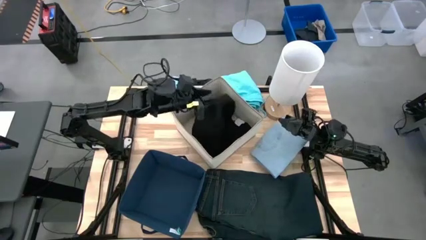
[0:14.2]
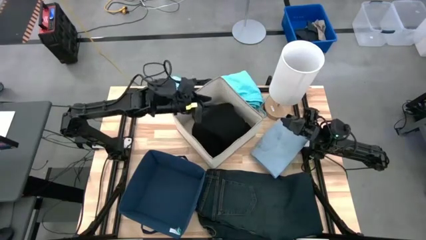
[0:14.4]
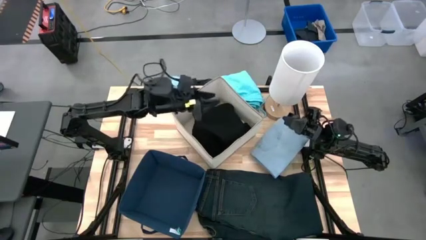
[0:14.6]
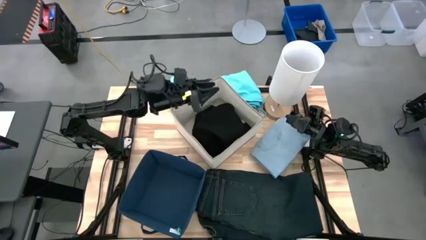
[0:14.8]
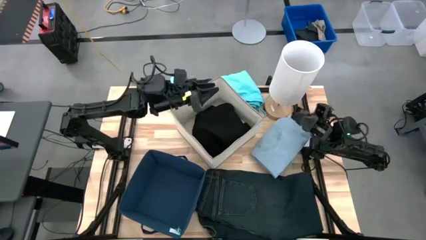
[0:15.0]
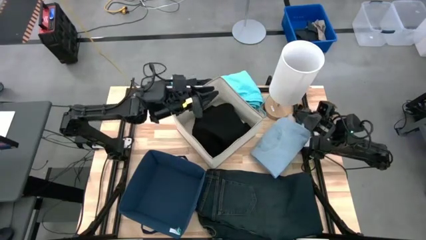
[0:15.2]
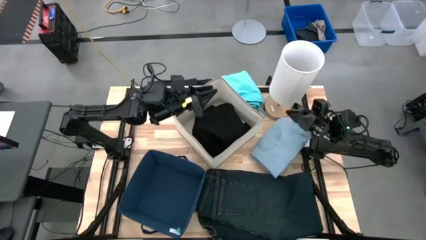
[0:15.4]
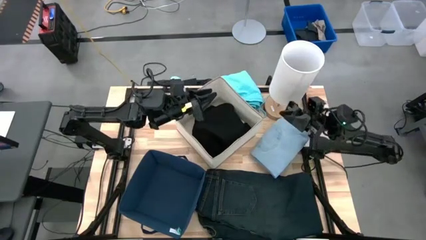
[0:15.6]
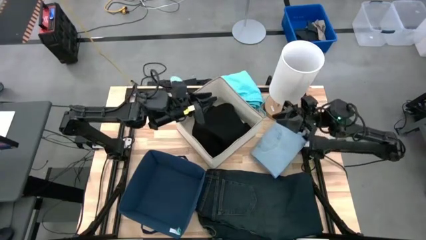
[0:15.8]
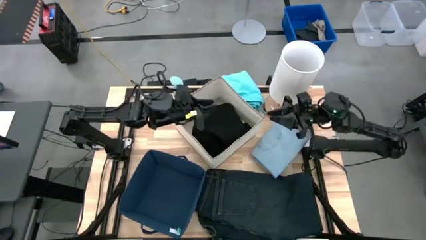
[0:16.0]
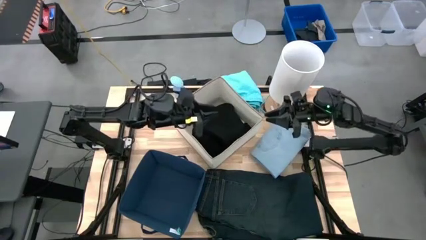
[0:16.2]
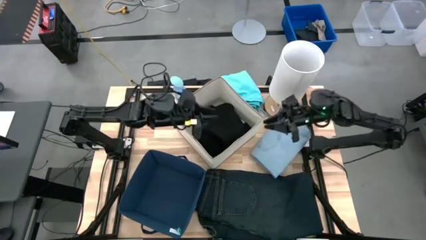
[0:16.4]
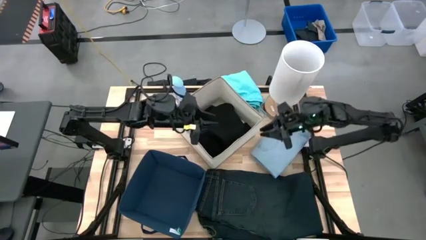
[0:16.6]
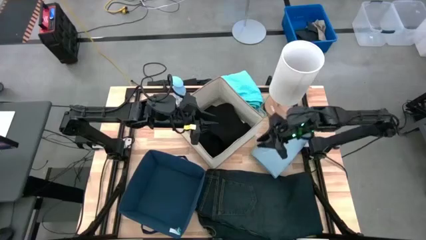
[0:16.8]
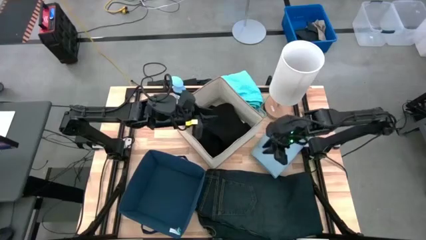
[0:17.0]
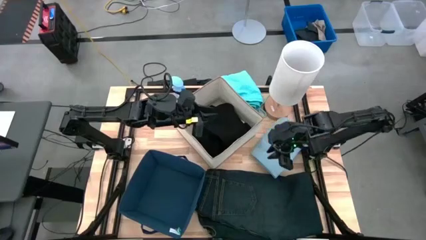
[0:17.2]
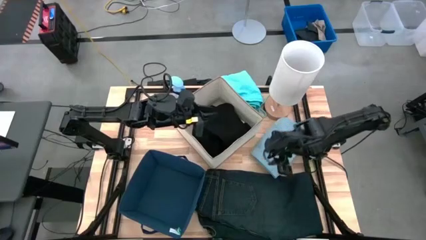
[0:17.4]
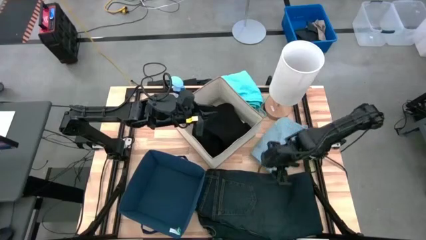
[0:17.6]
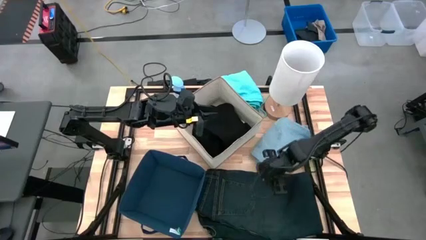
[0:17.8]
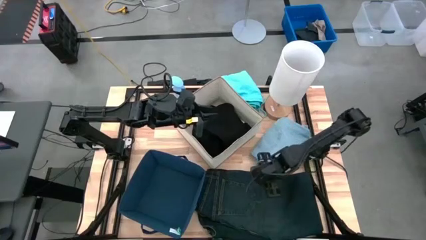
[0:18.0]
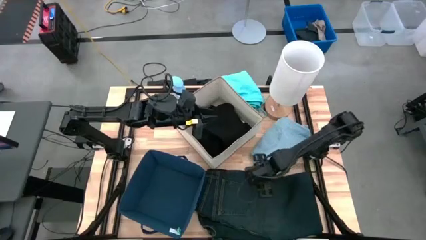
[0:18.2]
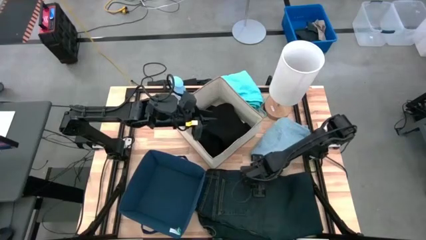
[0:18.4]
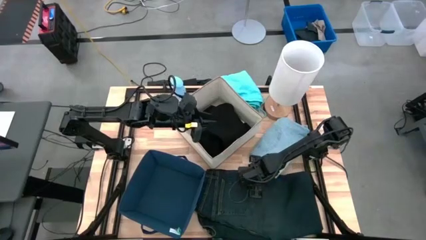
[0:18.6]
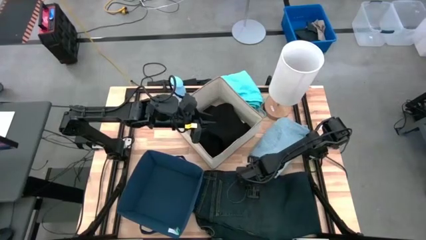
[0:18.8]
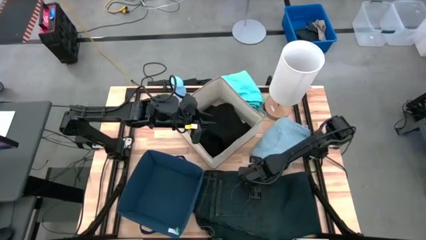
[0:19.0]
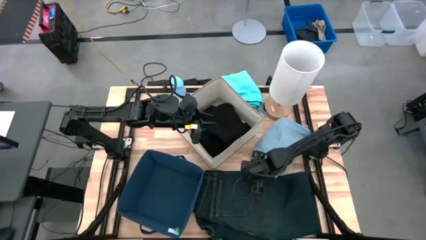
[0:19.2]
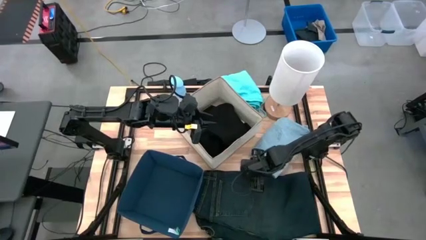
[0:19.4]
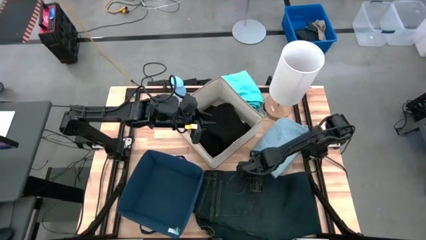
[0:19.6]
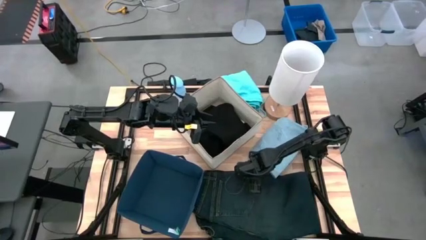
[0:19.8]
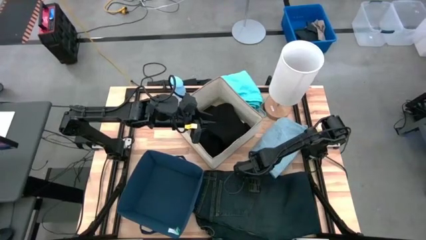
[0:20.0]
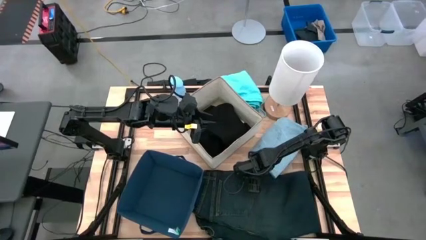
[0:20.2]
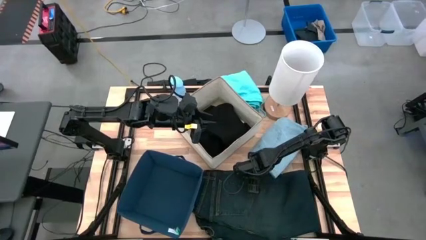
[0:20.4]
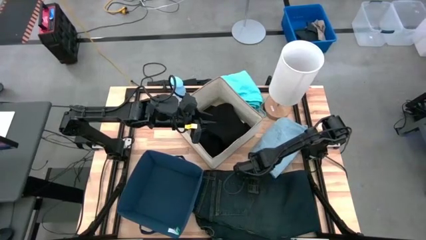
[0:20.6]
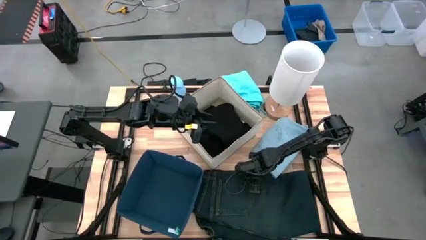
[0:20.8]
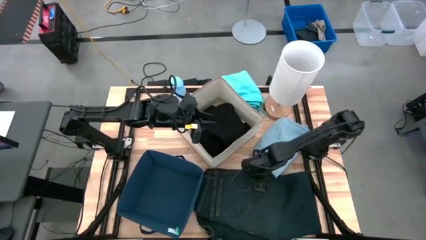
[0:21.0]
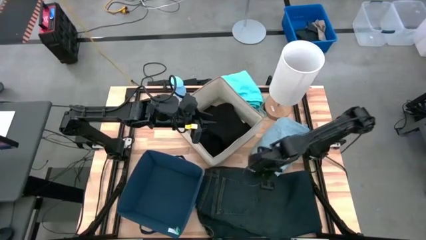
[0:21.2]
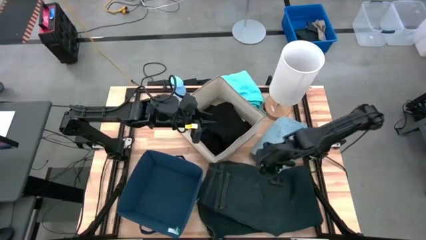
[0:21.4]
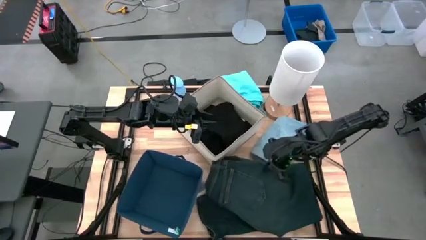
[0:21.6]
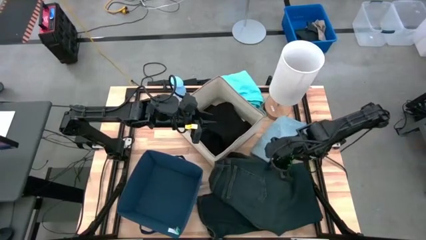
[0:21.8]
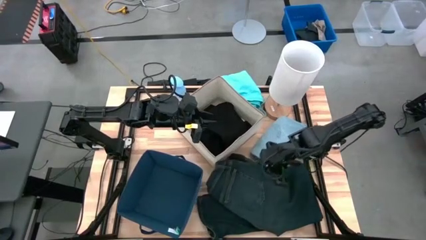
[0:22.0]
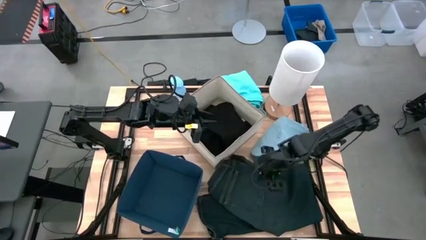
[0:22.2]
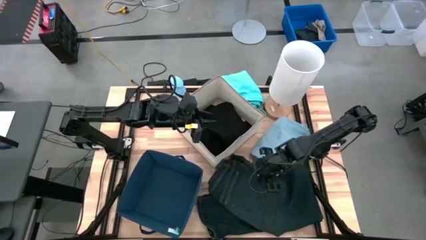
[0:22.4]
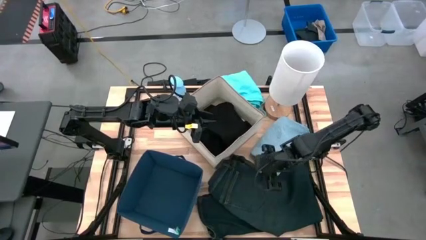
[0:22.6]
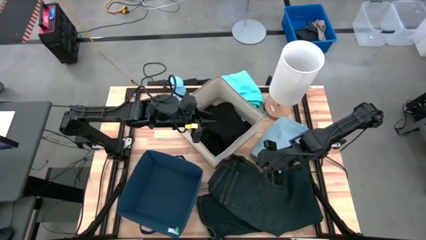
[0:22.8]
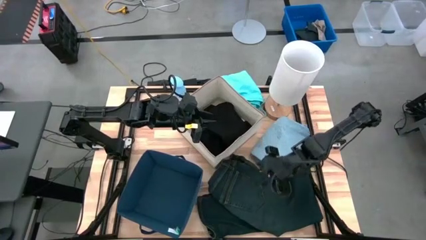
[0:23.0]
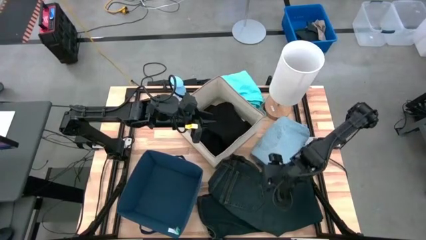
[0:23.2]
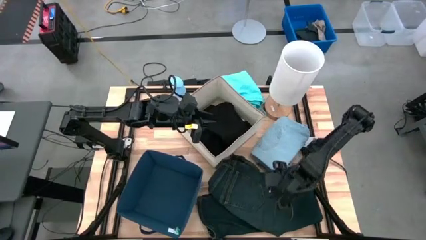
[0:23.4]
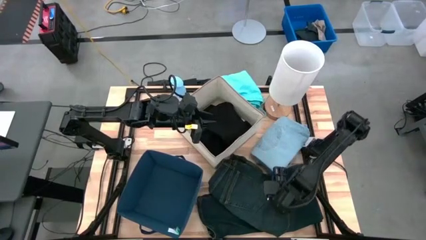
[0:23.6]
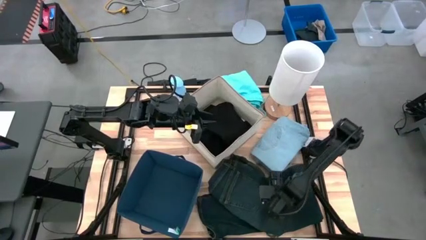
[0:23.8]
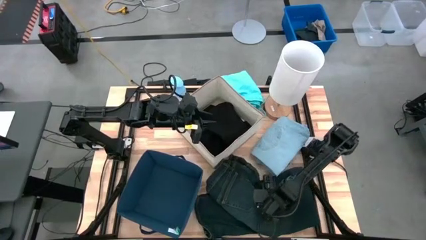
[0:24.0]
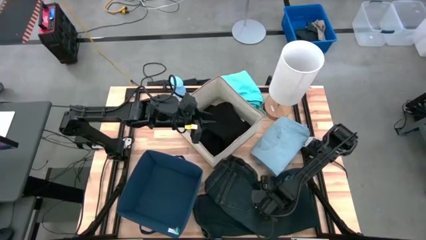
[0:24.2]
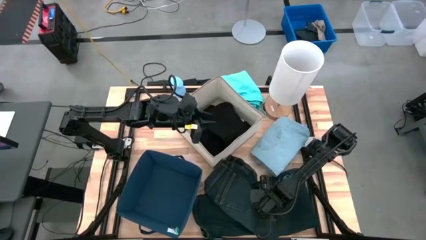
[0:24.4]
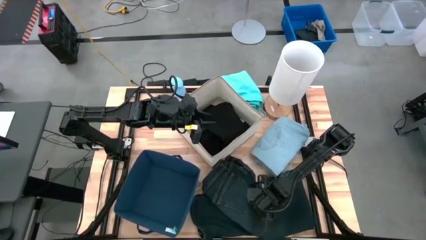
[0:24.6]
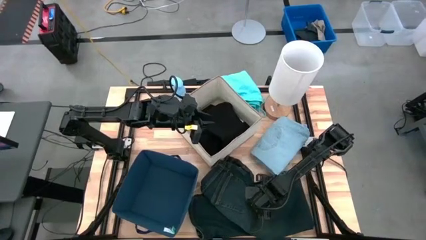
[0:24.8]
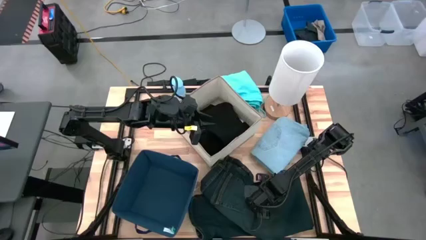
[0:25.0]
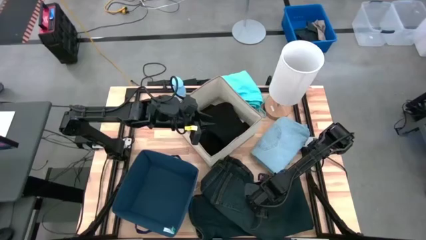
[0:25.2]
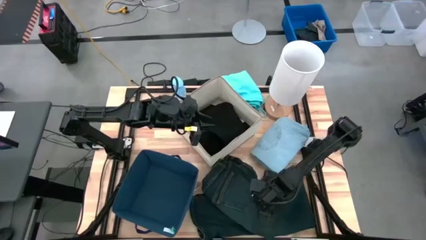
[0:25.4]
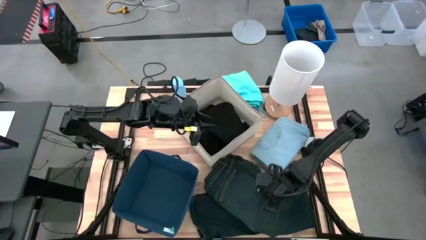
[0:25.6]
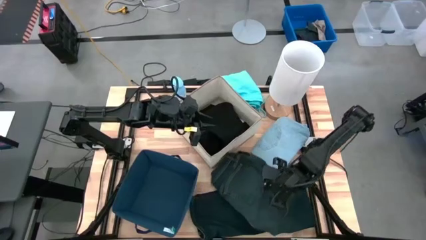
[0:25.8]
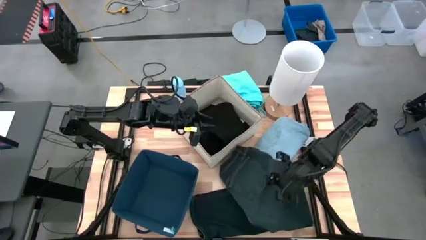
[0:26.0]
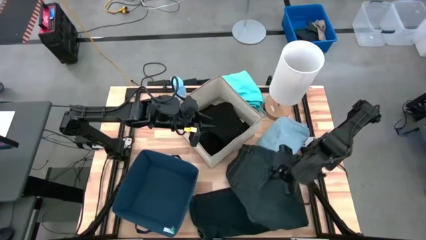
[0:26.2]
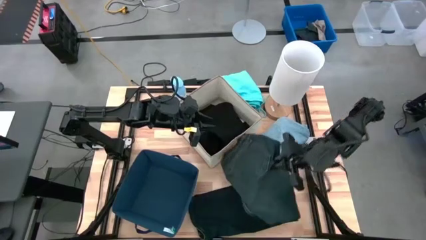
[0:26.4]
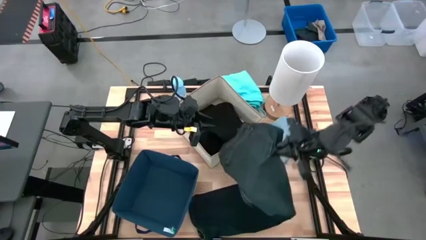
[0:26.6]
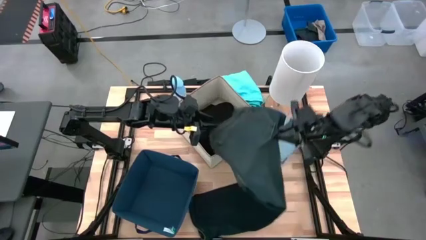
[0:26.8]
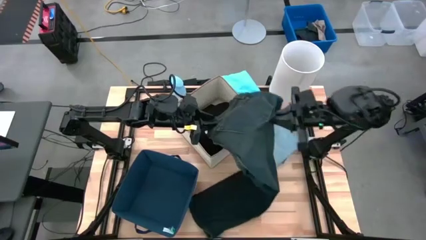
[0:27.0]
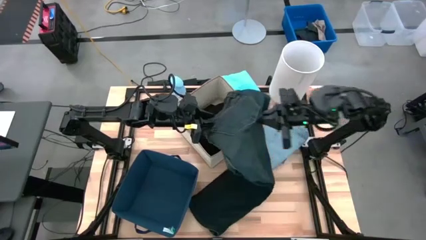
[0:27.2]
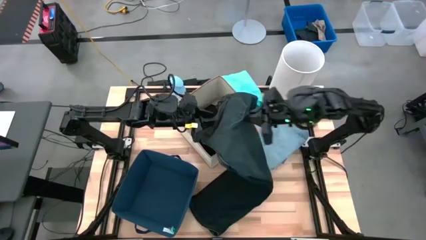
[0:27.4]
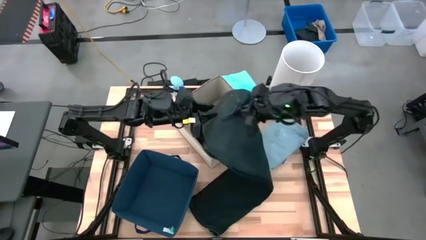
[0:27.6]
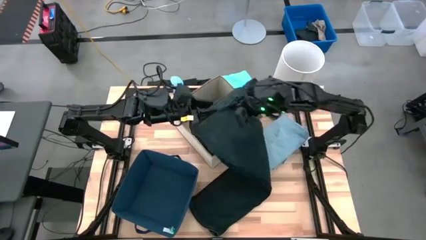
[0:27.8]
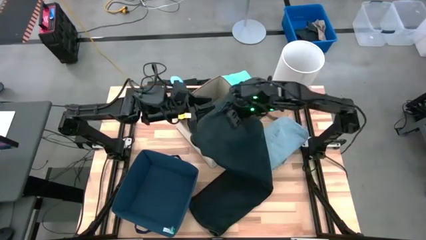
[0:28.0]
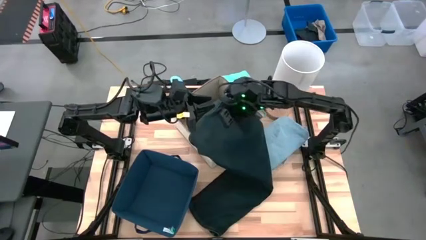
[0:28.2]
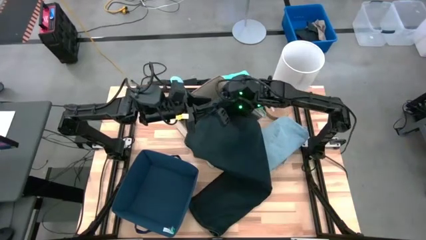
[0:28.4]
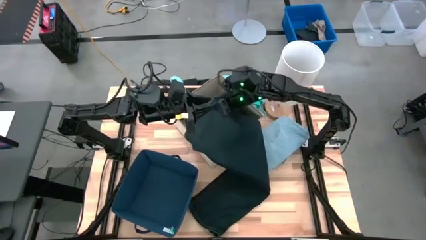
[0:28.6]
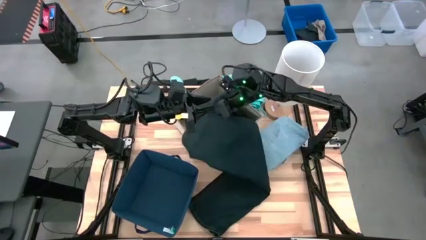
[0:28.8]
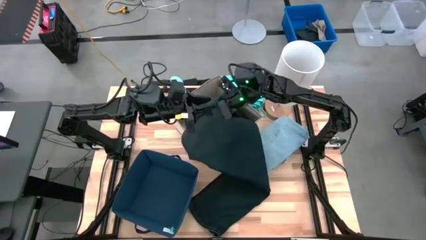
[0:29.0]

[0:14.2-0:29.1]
Task: Sort clothes
Put the blue pants into the white laundry organizer
